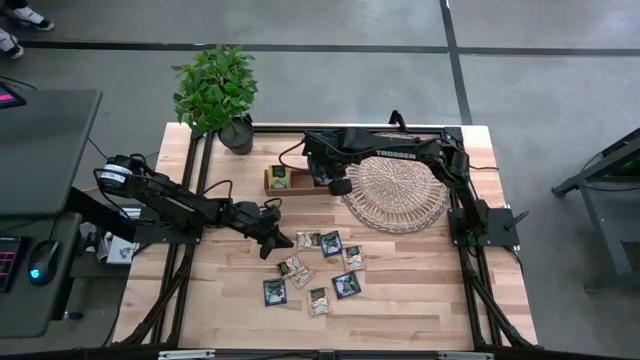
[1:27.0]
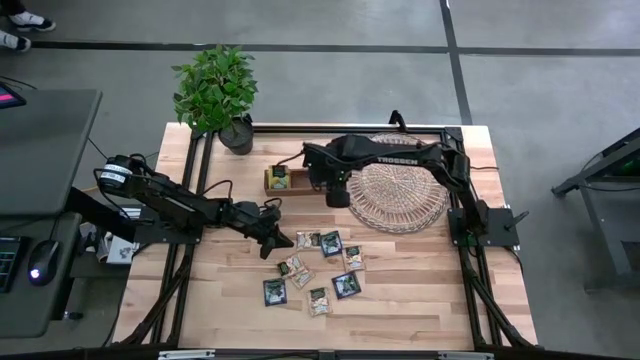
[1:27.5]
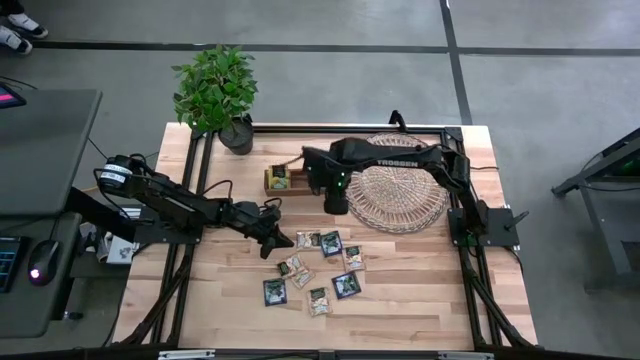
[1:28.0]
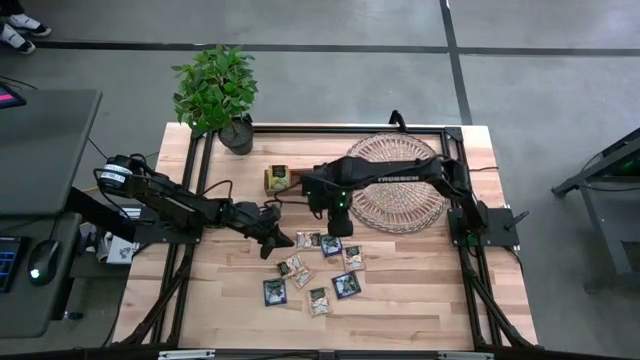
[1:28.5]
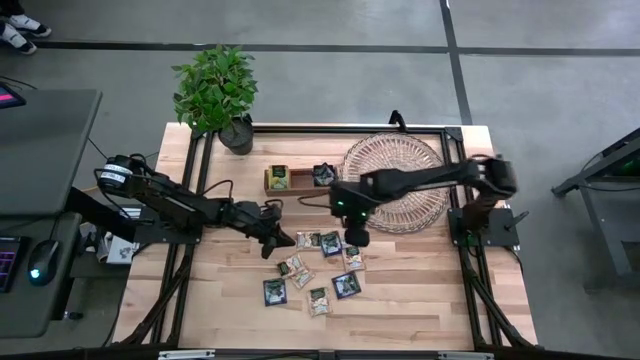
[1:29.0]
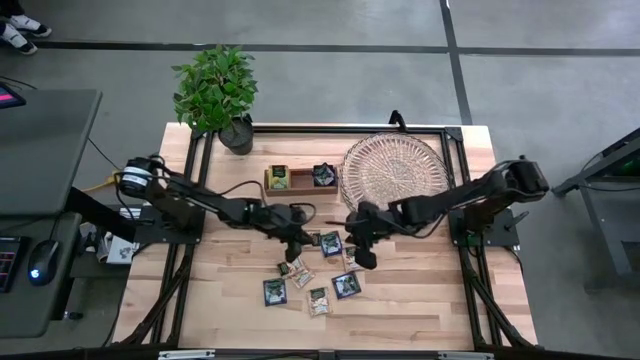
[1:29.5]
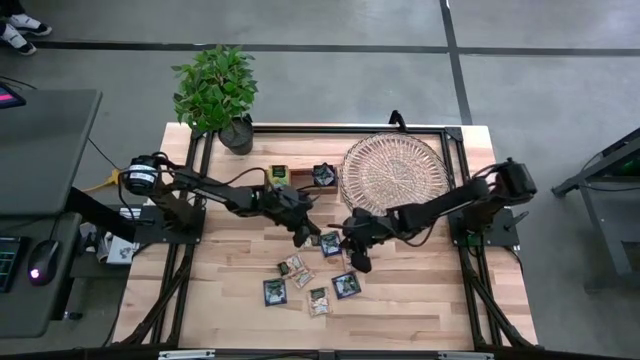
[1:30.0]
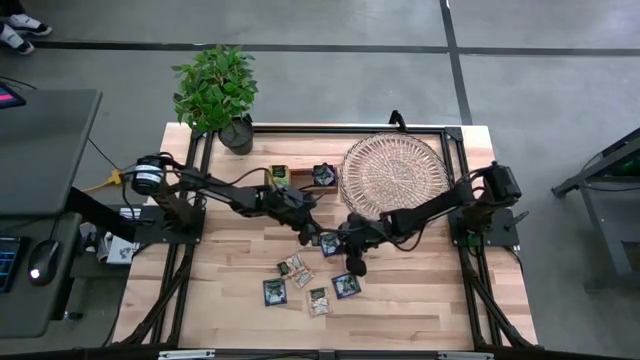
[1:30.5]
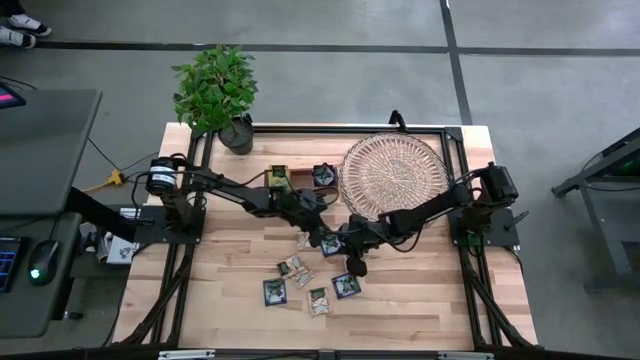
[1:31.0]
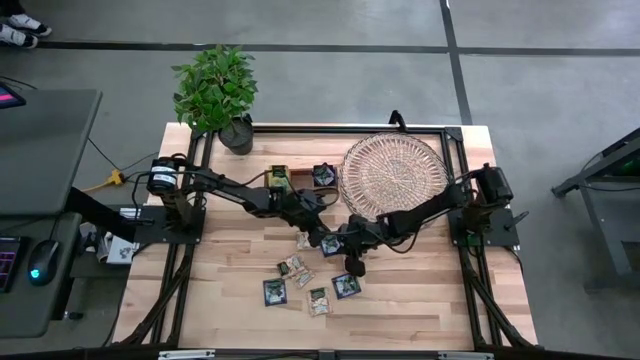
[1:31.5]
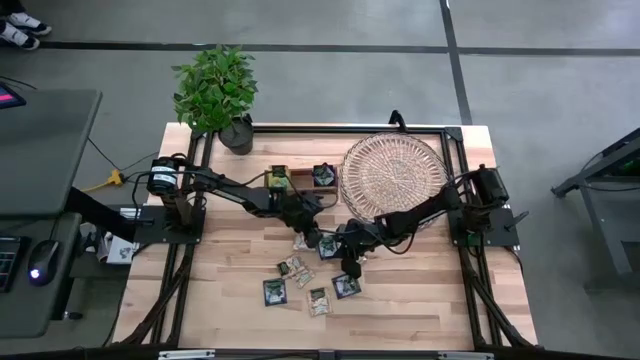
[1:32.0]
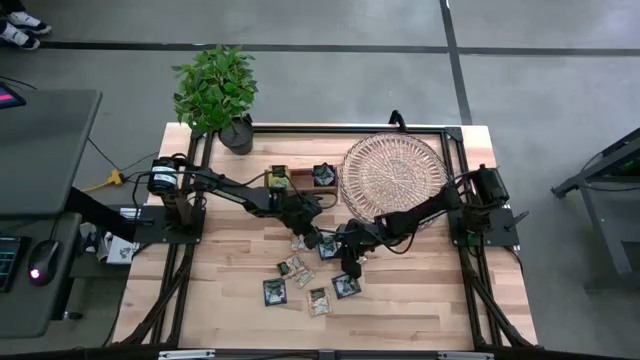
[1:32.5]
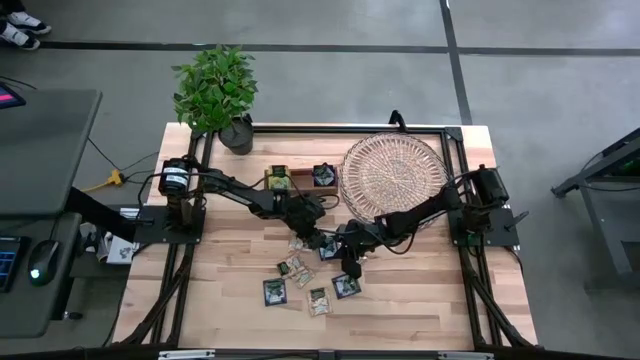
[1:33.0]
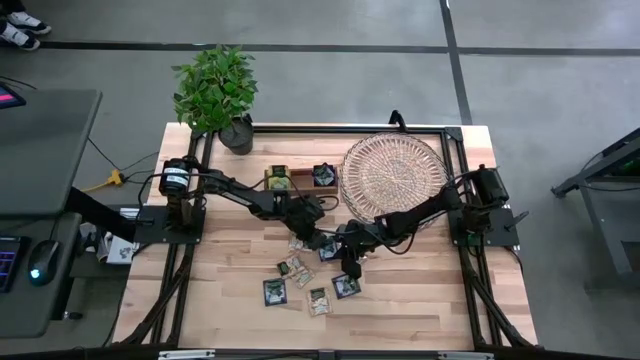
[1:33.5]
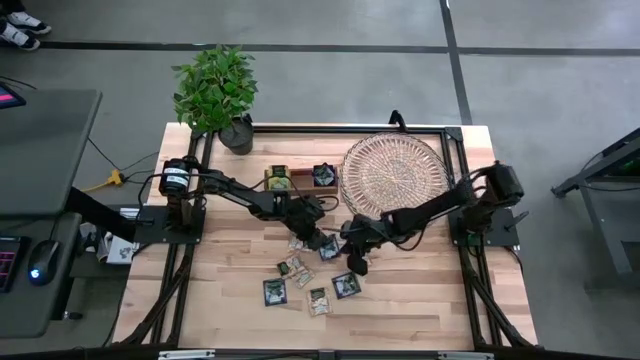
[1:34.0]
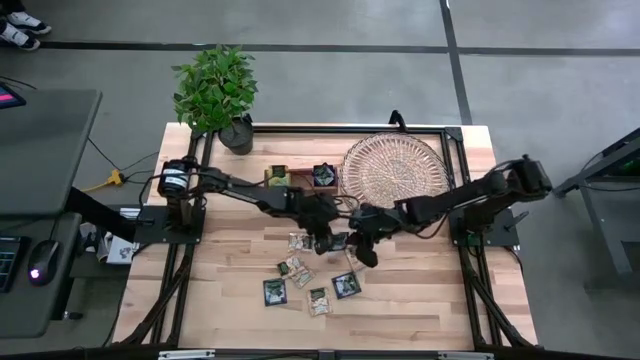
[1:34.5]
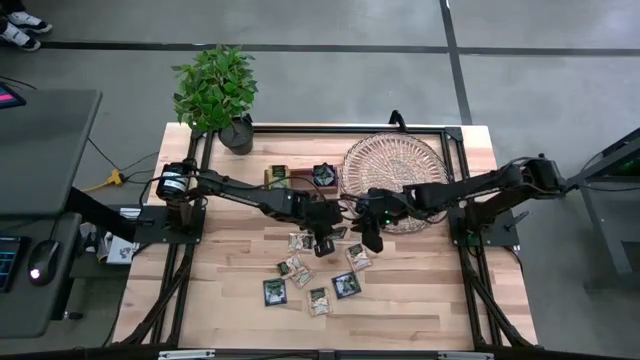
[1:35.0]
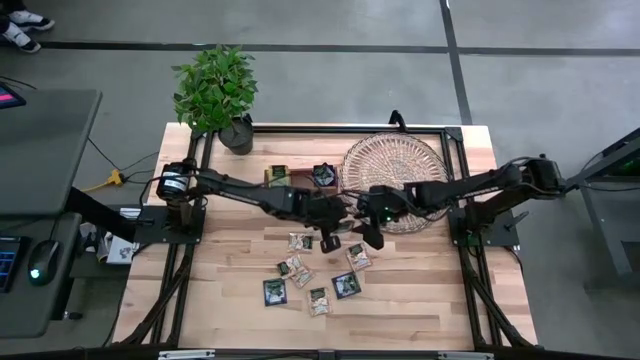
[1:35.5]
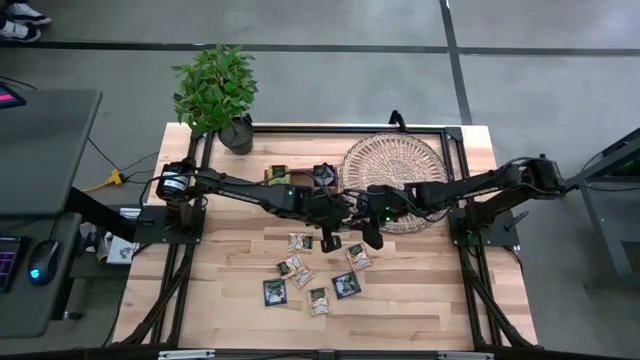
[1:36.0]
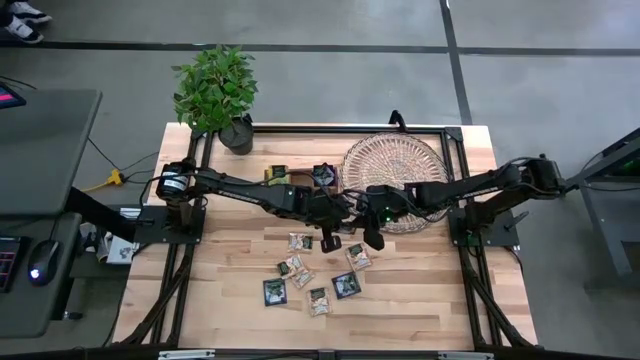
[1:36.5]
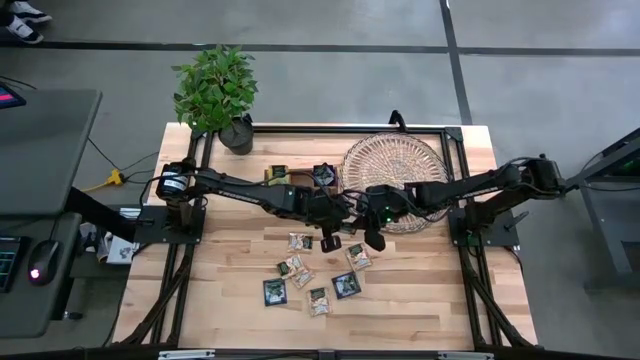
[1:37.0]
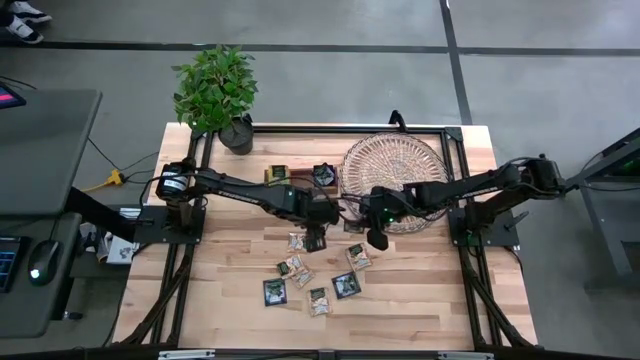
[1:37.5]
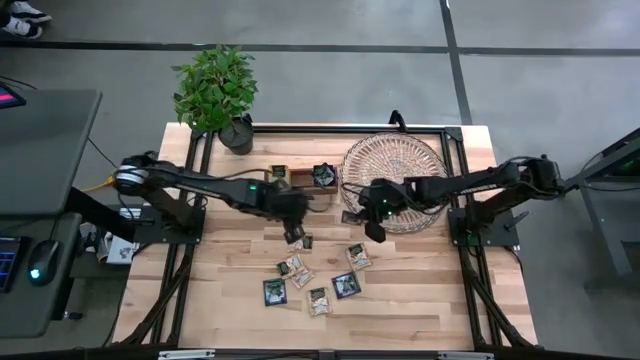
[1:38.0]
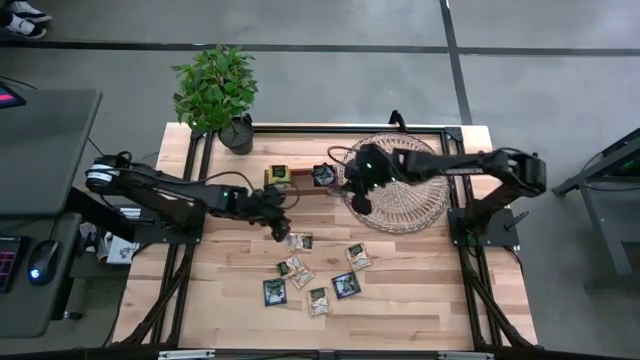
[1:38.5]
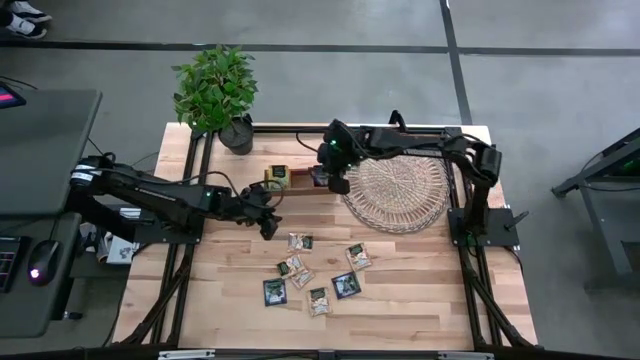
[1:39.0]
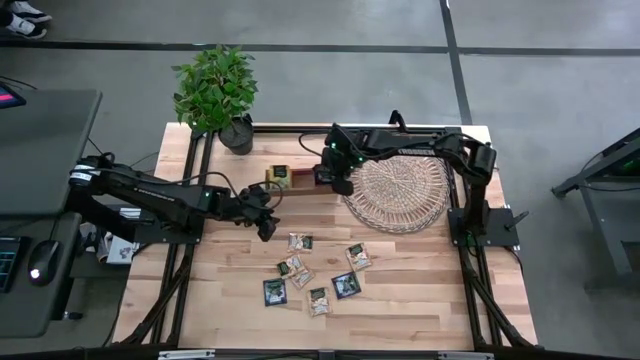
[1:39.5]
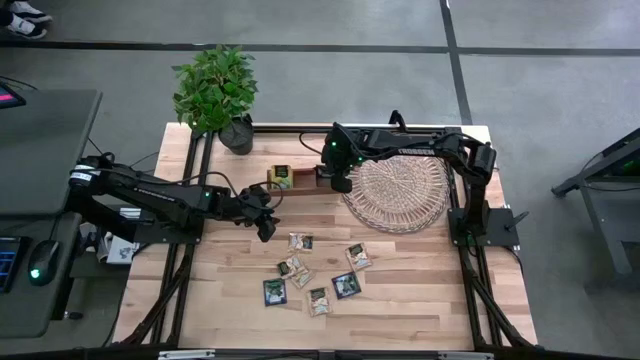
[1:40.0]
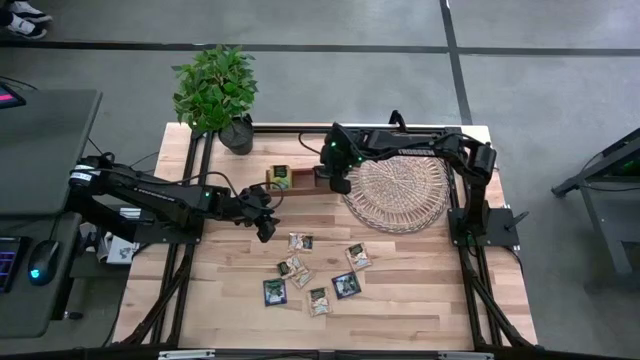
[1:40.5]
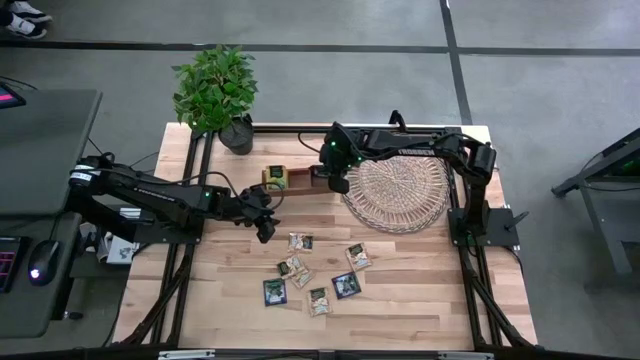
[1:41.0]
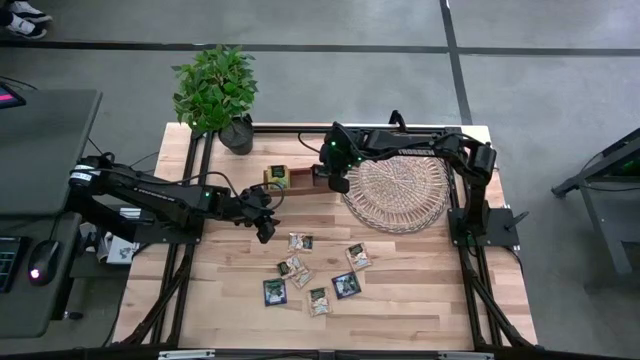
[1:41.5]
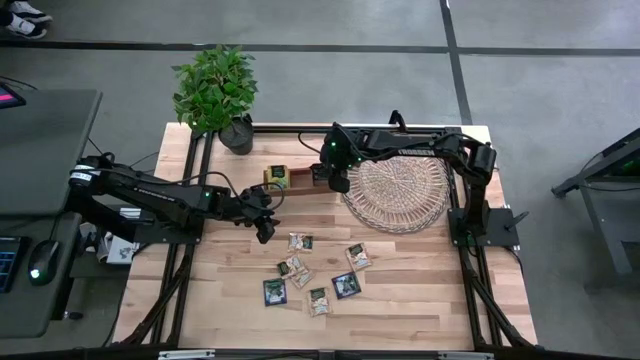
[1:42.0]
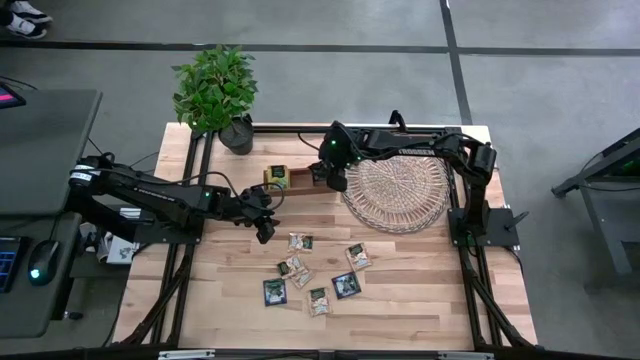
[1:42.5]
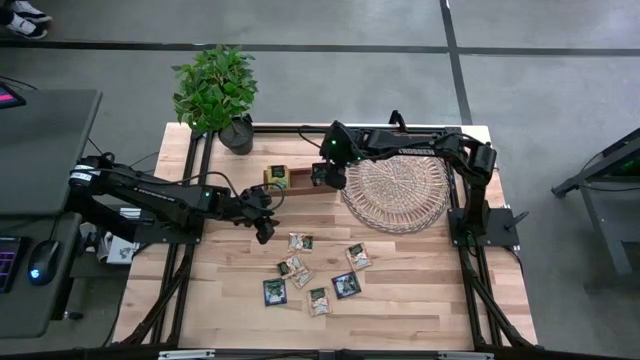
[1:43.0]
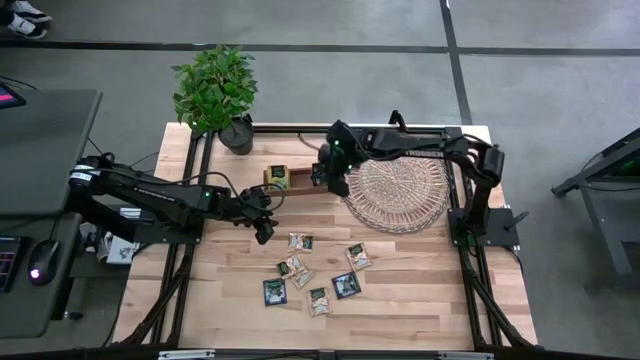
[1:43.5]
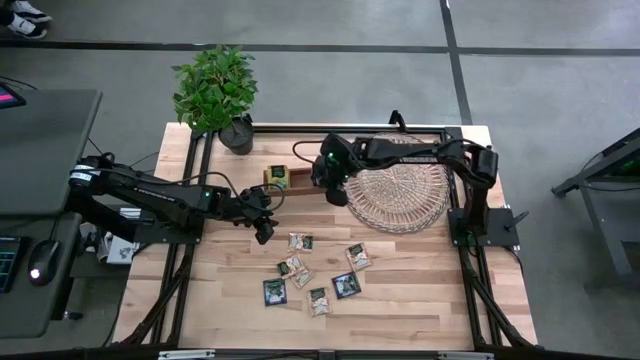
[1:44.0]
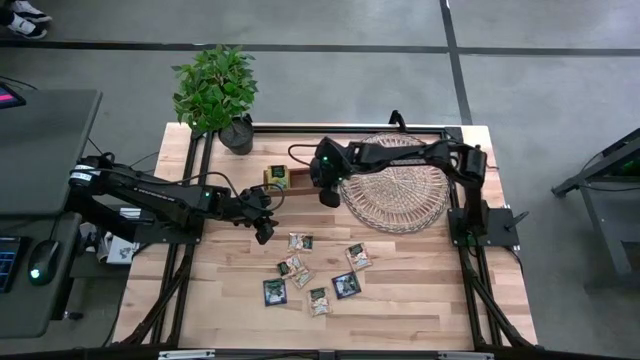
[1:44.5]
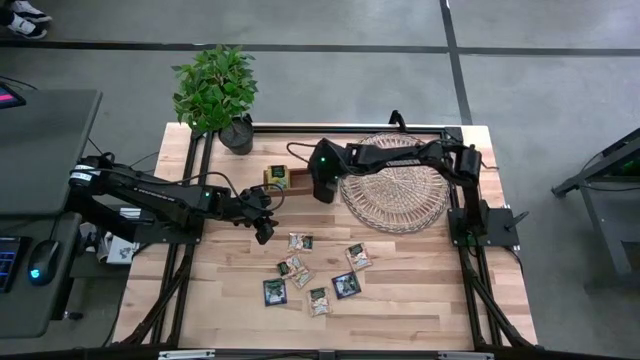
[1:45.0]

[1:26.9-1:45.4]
Task: Pick & Place Tea
Put the blue tea bag into the right section of the wooden organizer

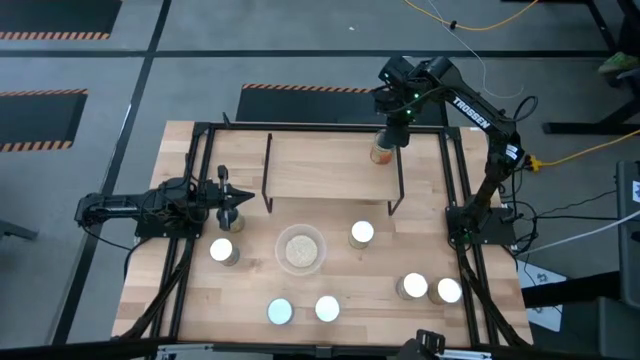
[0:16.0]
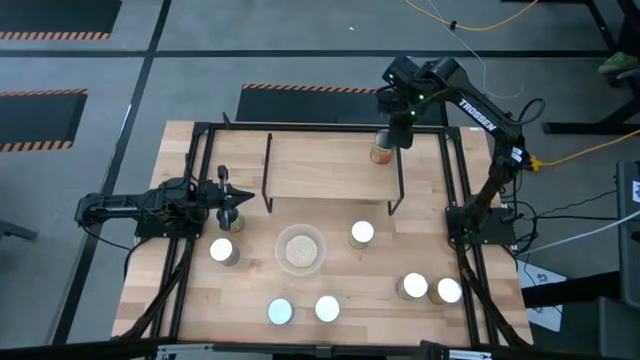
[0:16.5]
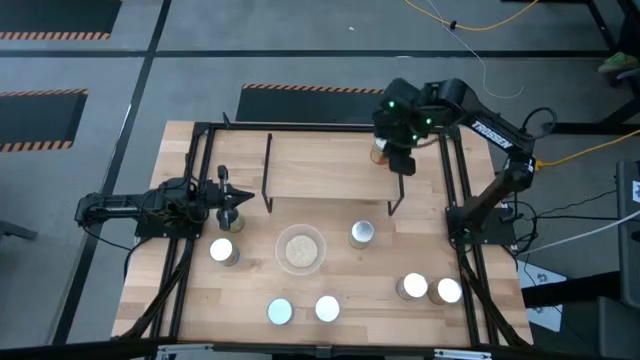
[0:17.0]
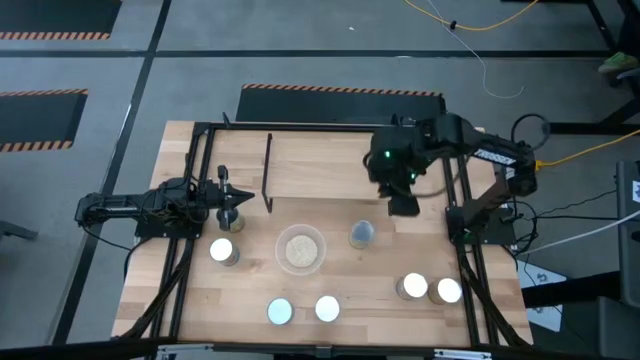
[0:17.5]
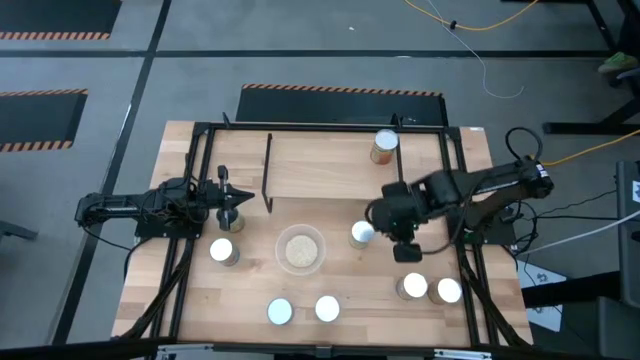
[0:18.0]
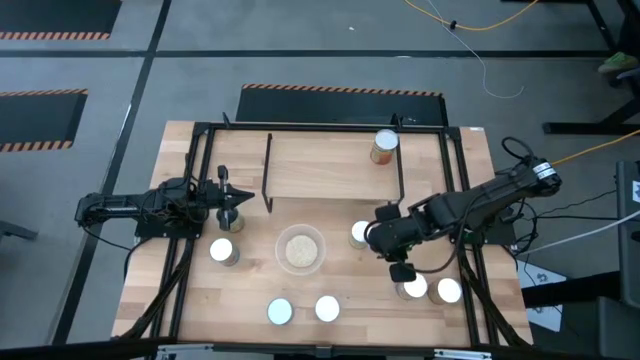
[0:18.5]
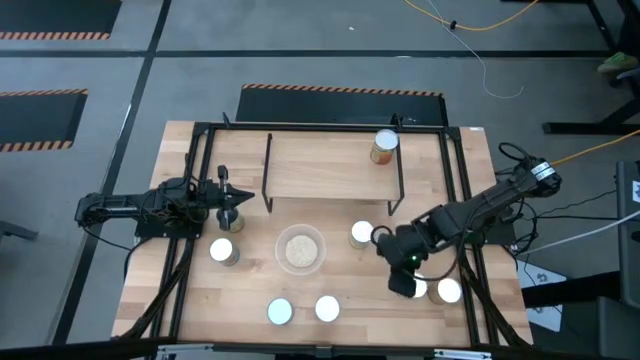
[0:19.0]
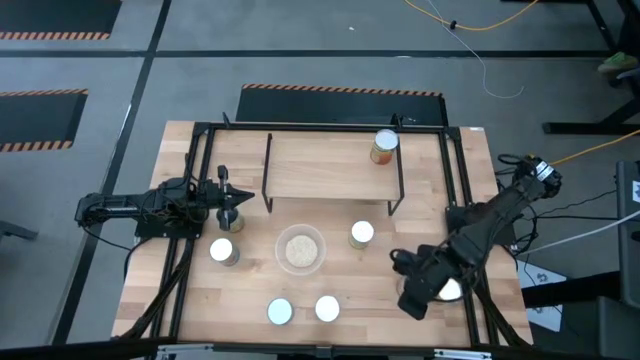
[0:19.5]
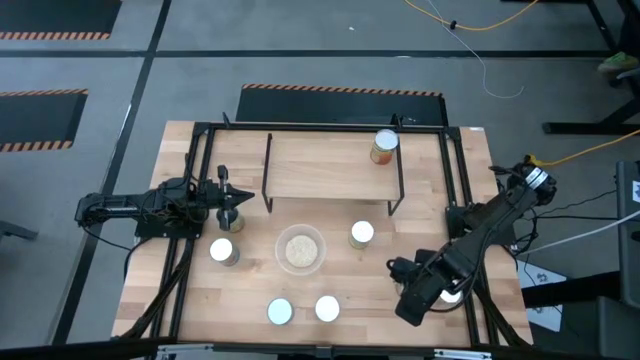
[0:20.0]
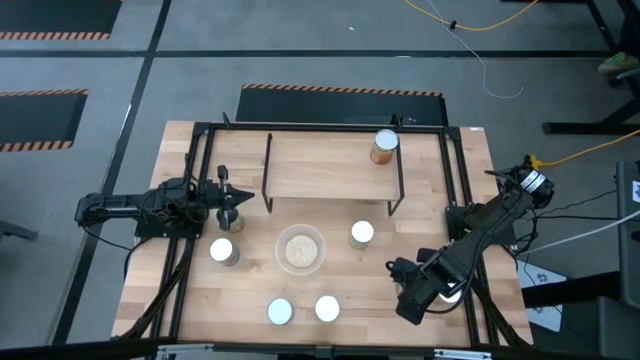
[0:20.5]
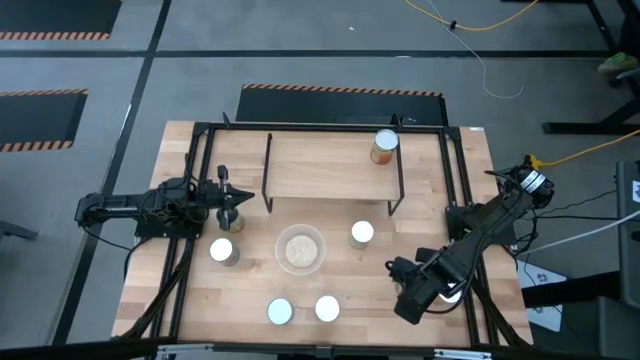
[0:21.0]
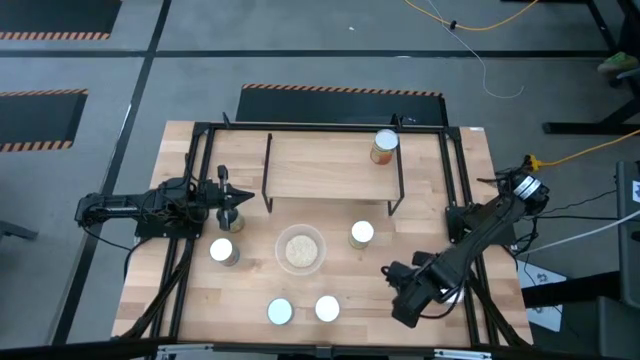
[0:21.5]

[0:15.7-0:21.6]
Task: Pick and place cans onto a shelf
Put the canned peaches on the shelf
